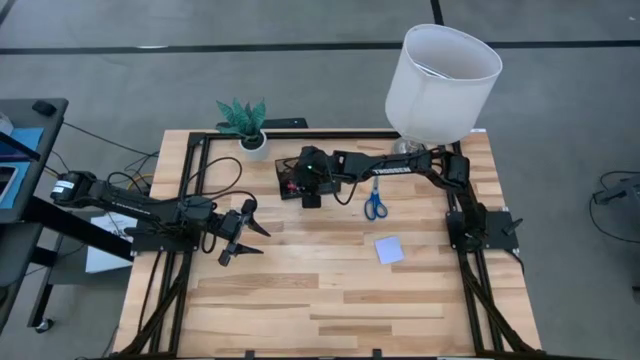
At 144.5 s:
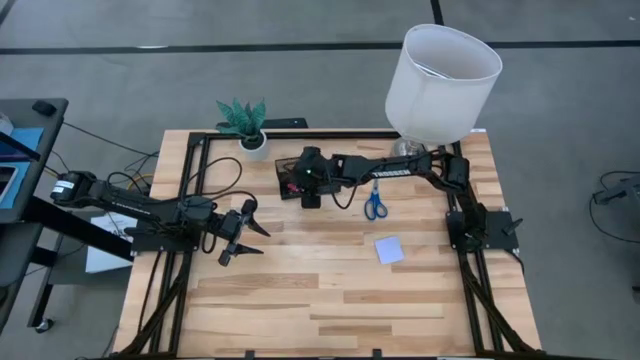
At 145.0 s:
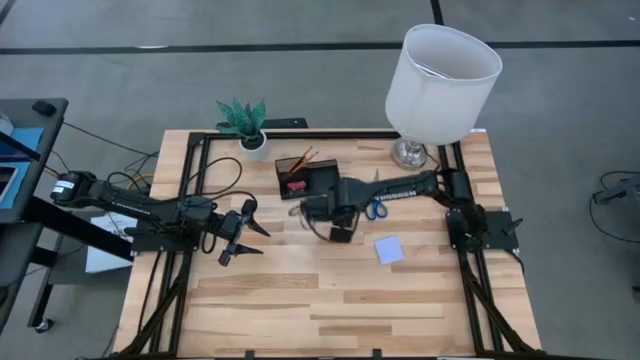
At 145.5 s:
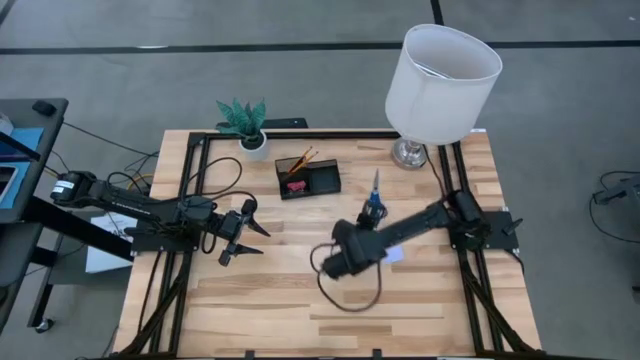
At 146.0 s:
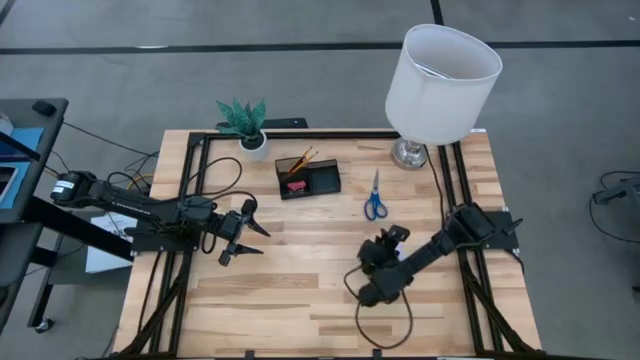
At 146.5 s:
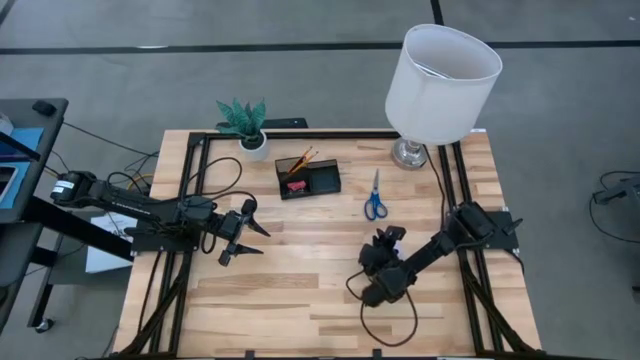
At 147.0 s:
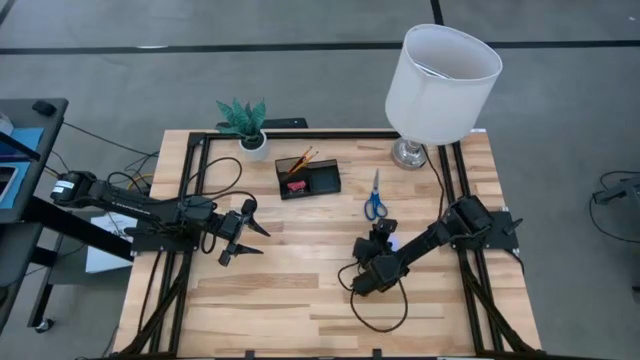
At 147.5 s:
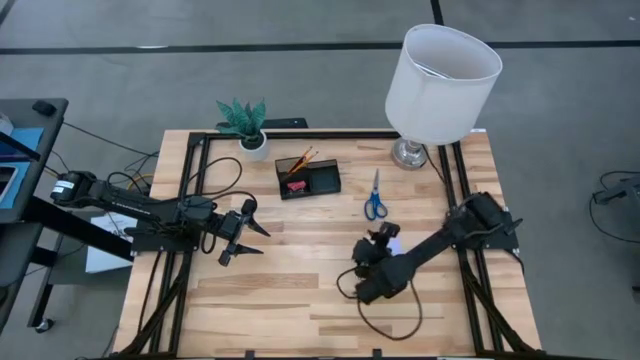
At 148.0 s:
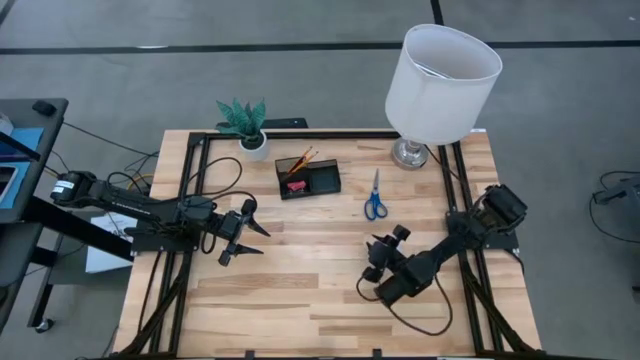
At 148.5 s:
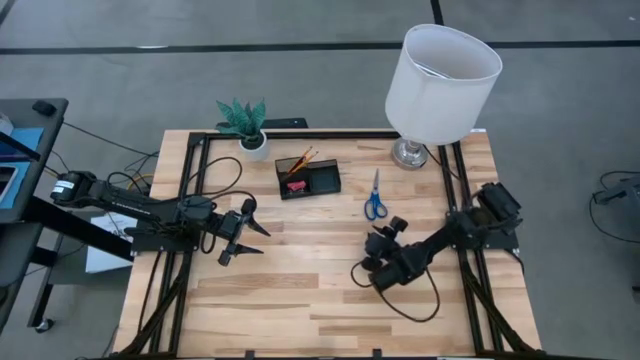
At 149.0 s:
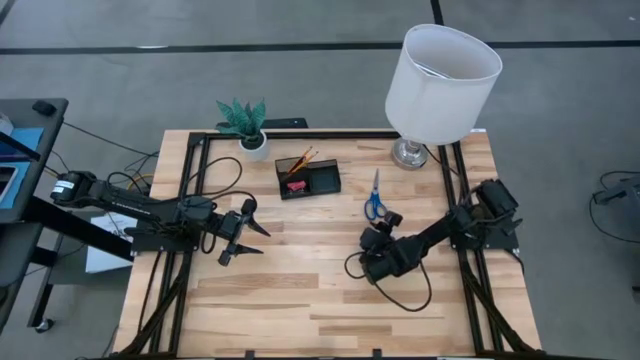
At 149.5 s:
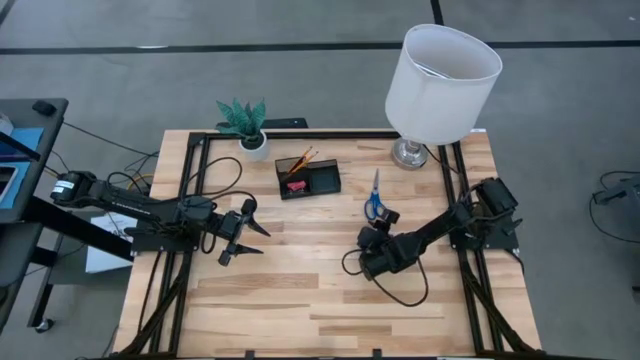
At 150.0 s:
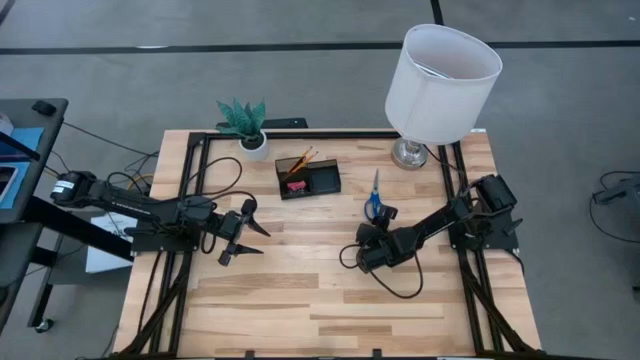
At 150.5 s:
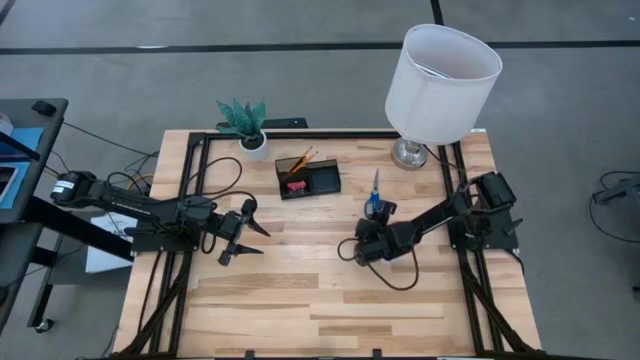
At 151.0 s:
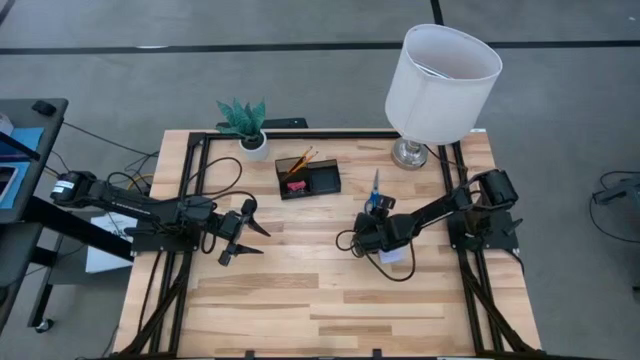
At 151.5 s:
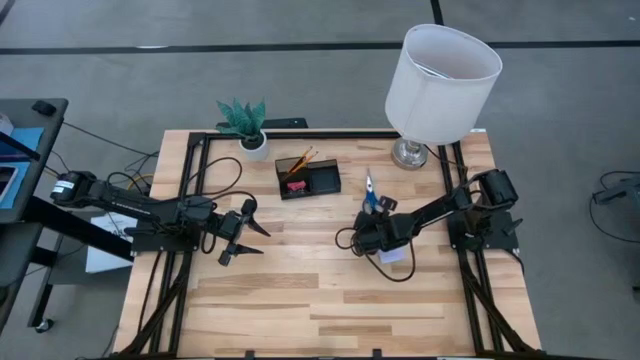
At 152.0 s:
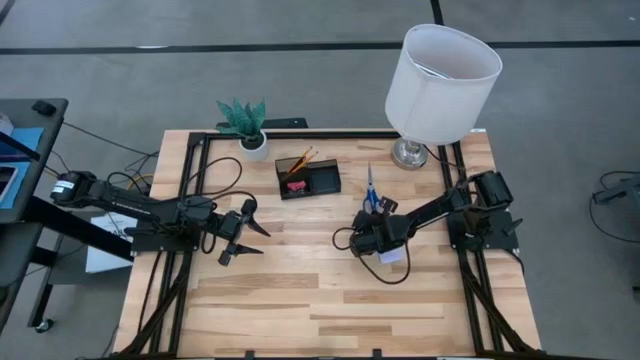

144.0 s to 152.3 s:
Task: Pick and place office supplies into organizer
Put the blue scissors into the black desk organizer

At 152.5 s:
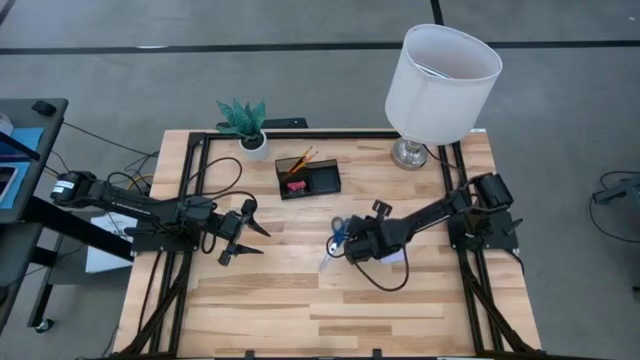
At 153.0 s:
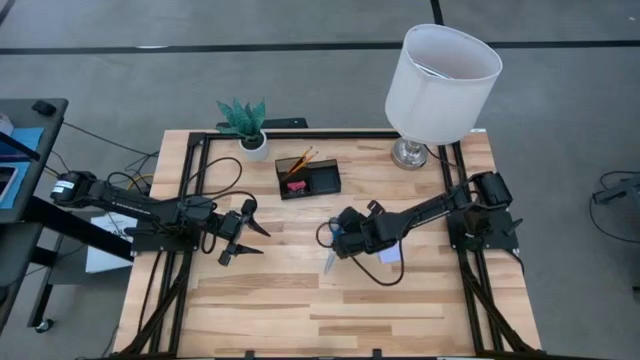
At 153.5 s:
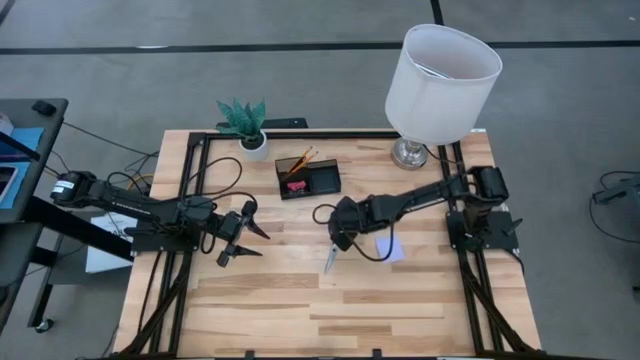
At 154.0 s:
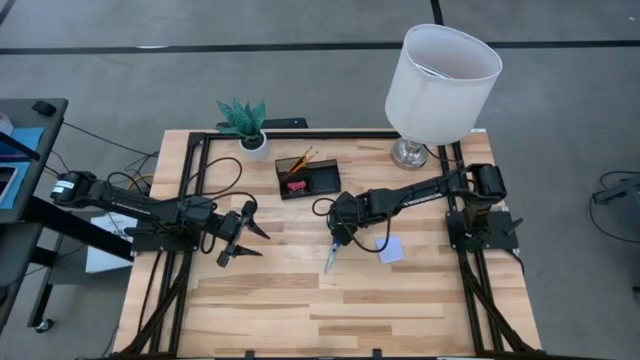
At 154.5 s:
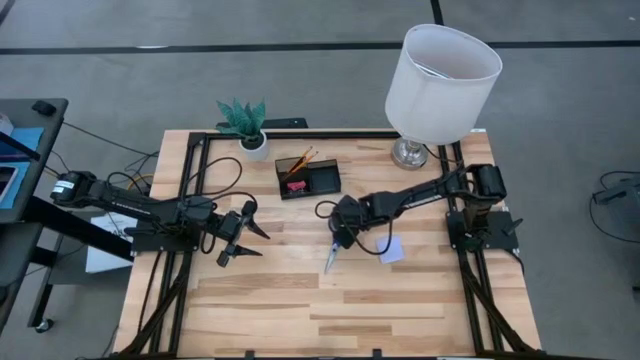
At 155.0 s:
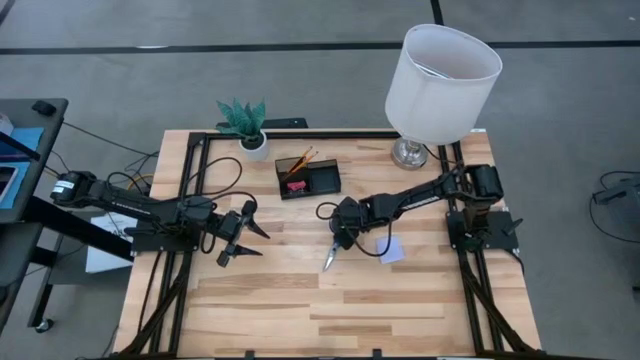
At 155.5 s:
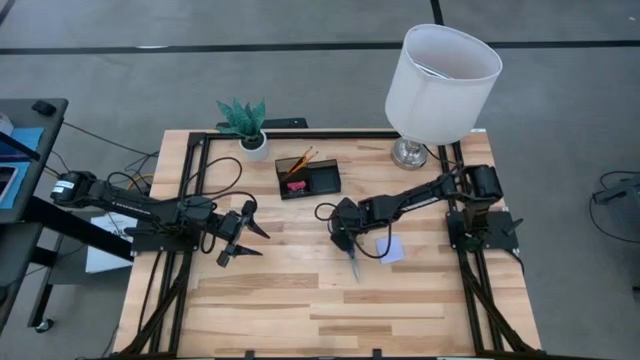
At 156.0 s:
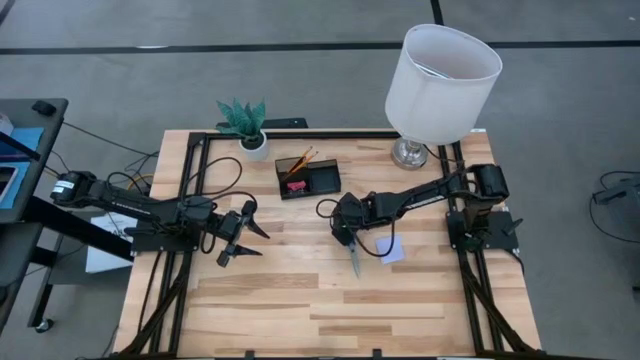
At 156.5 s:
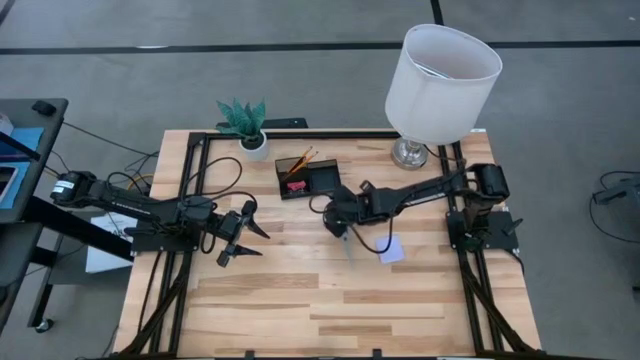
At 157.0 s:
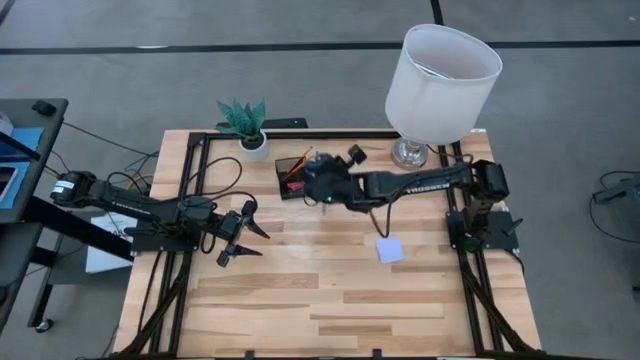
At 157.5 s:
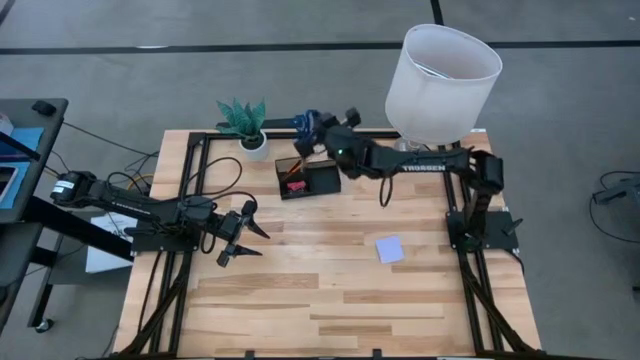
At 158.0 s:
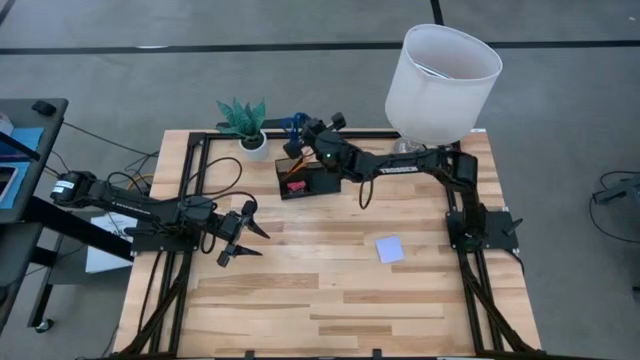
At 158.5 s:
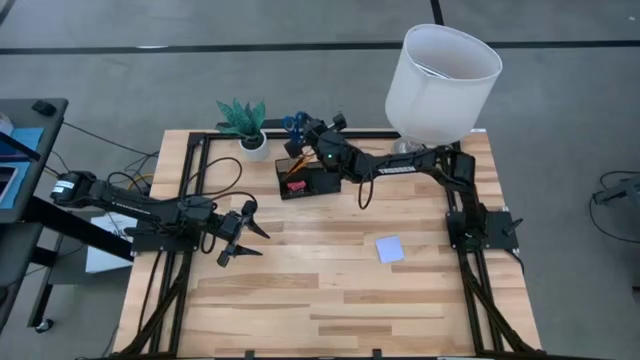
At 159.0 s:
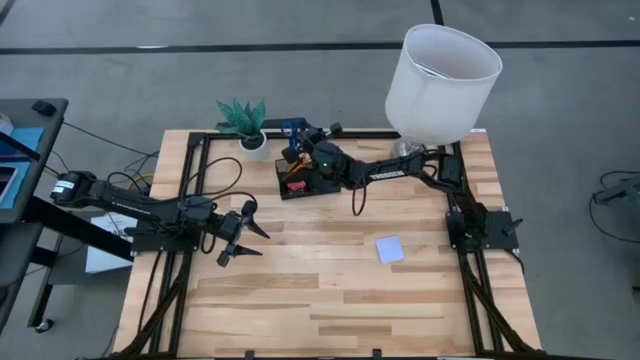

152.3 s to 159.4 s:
Put the blue scissors into the black desk organizer

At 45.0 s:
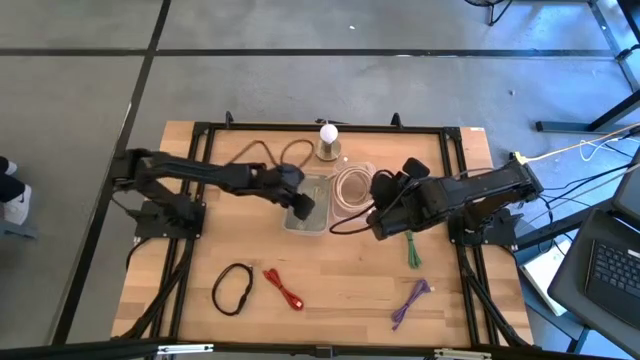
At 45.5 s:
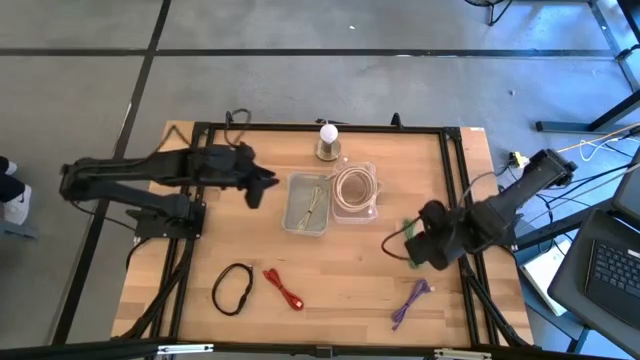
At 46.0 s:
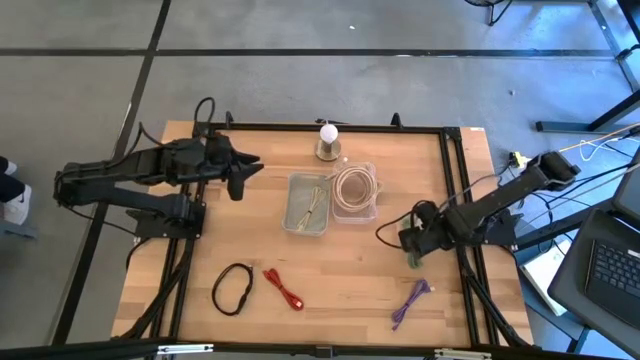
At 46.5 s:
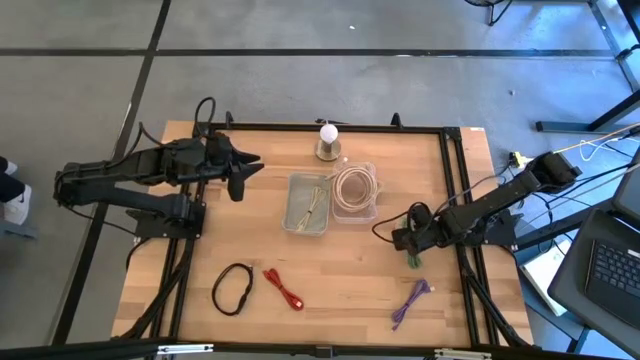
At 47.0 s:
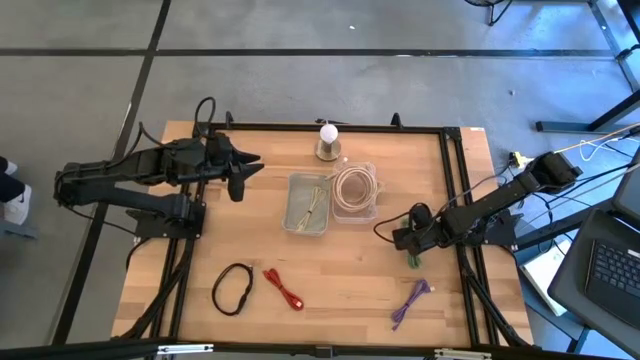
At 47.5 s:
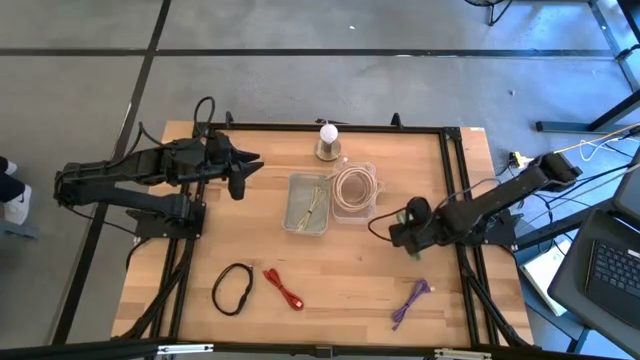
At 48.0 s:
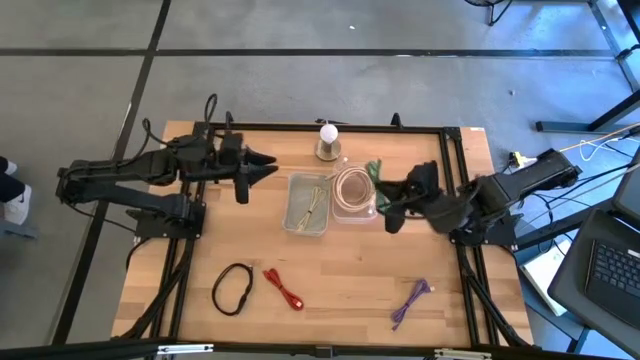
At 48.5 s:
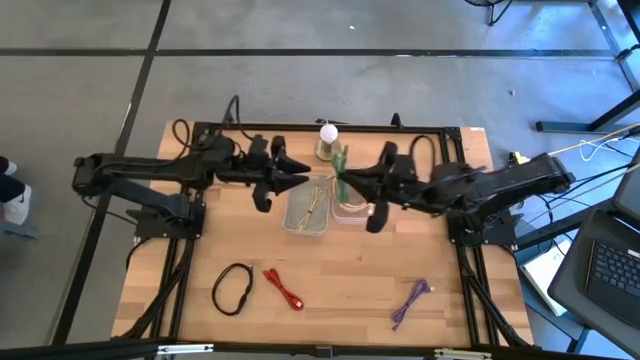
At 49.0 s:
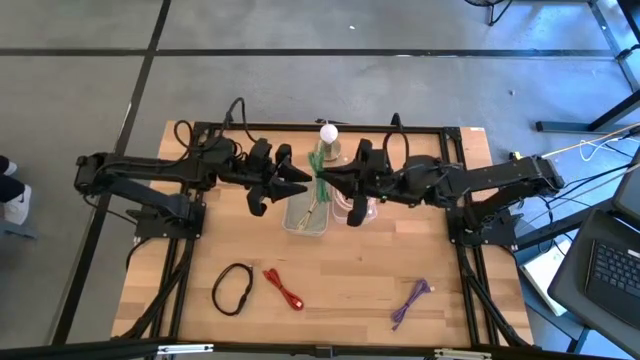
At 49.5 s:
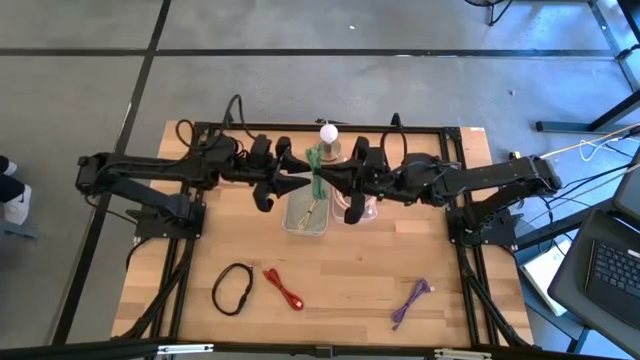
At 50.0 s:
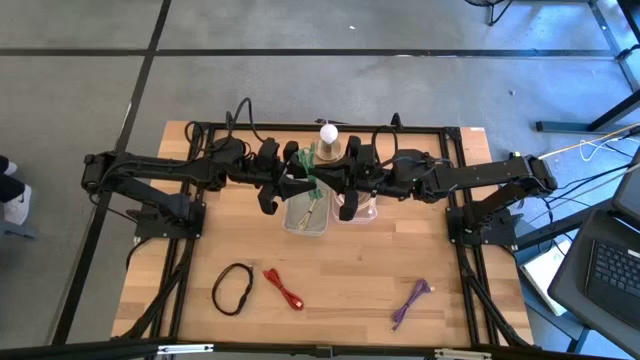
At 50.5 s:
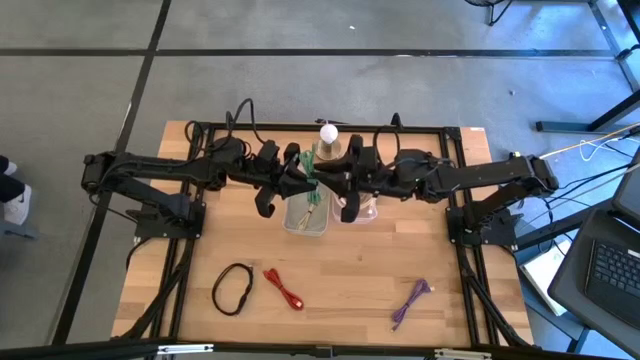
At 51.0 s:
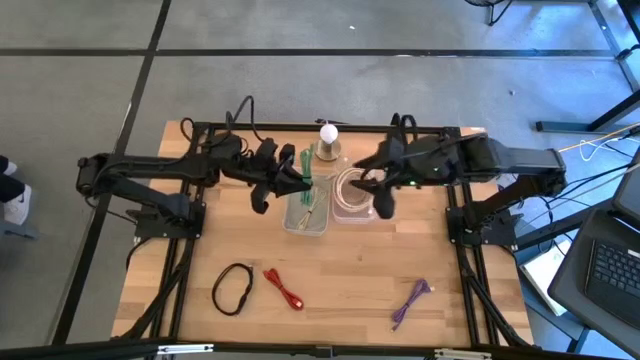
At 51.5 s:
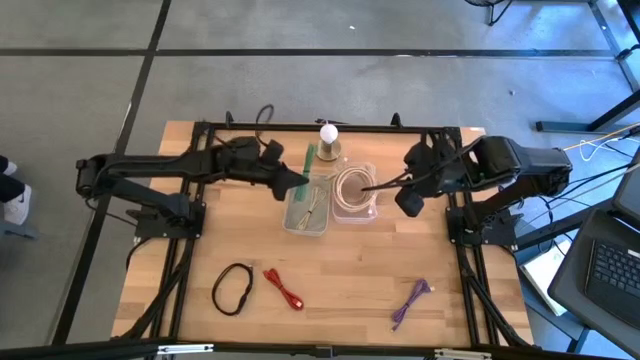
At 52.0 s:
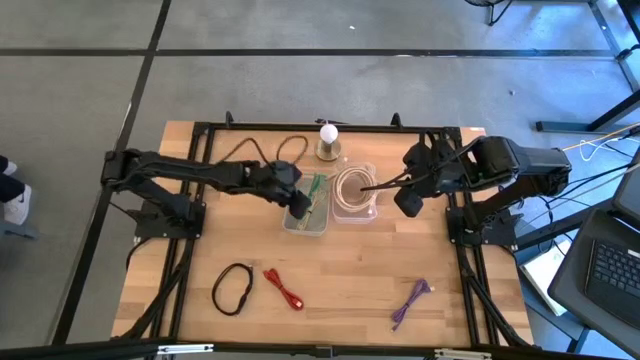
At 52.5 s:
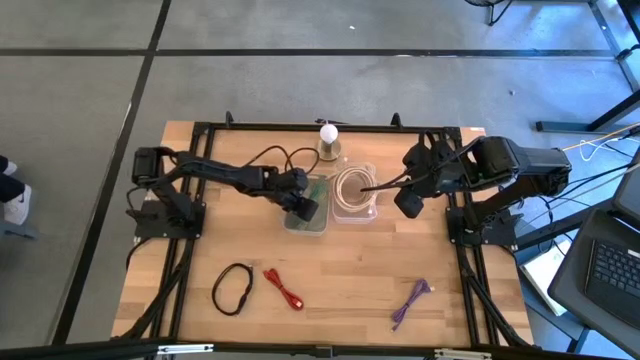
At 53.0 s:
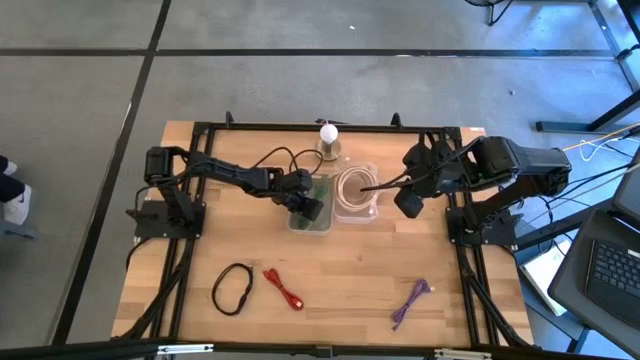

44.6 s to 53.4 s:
Task: Pick and place USB-C Cables
Put the green charger cable into the gray bin
